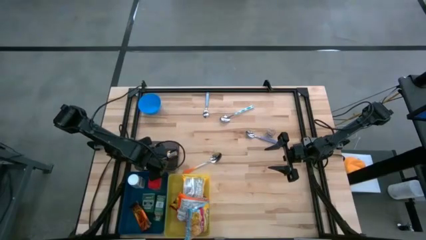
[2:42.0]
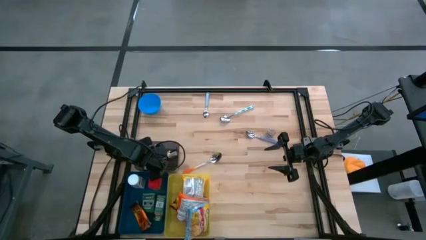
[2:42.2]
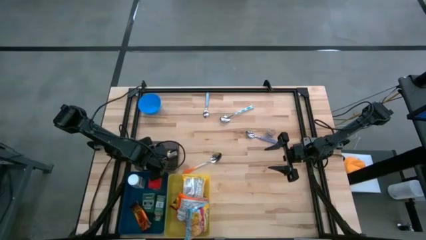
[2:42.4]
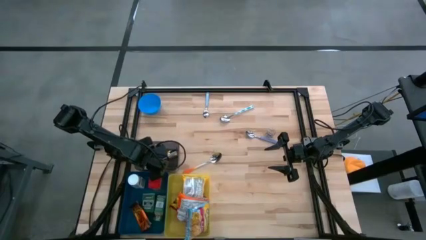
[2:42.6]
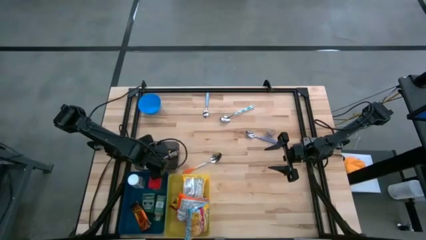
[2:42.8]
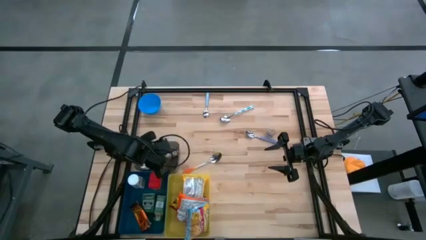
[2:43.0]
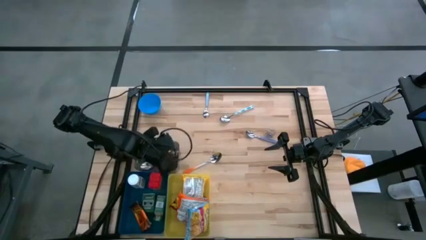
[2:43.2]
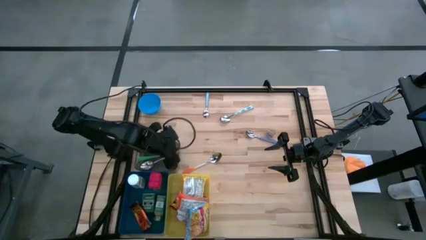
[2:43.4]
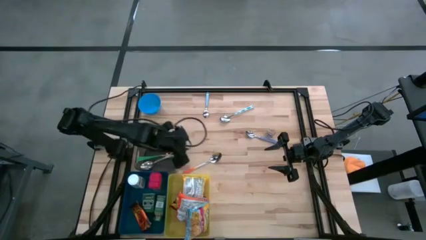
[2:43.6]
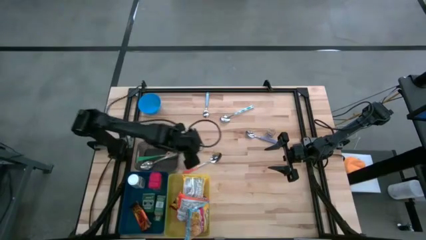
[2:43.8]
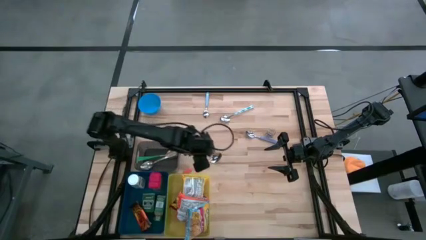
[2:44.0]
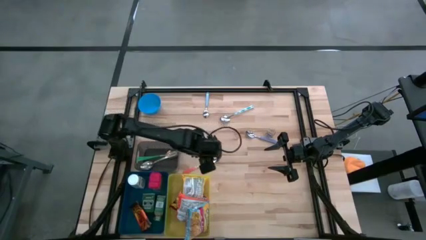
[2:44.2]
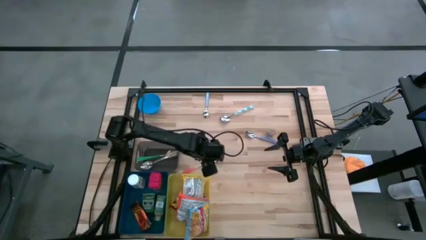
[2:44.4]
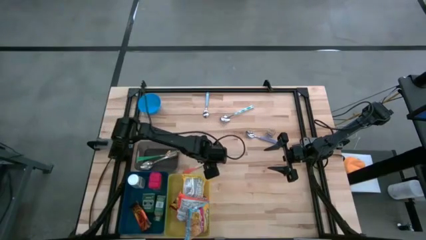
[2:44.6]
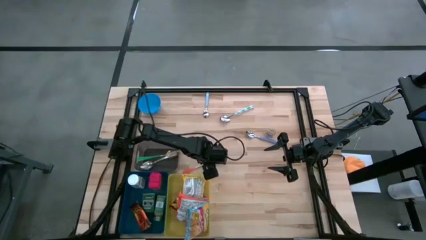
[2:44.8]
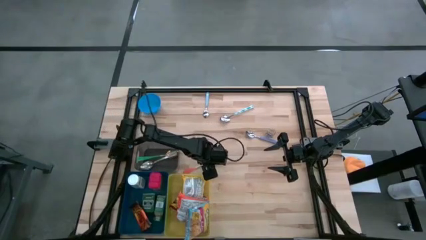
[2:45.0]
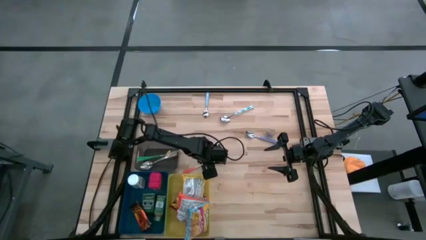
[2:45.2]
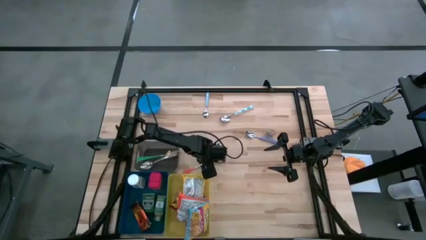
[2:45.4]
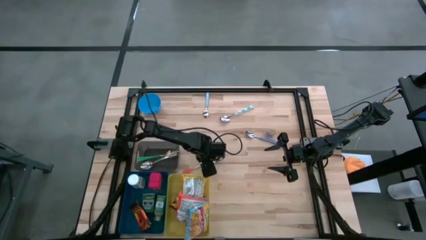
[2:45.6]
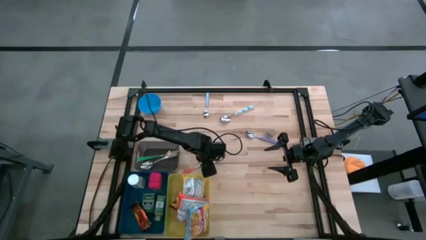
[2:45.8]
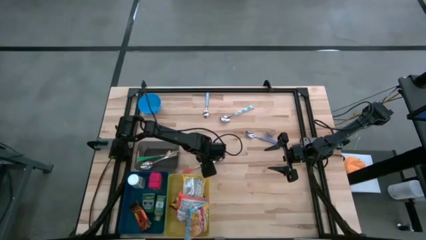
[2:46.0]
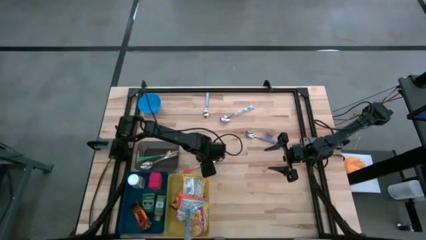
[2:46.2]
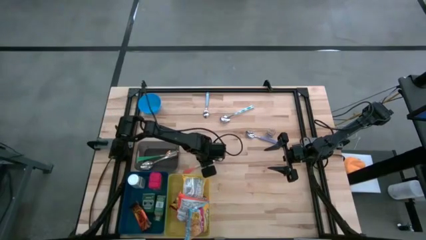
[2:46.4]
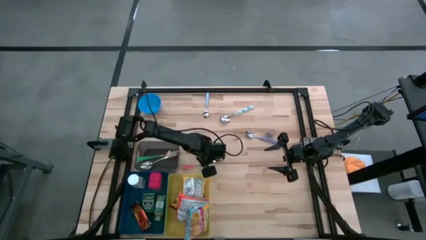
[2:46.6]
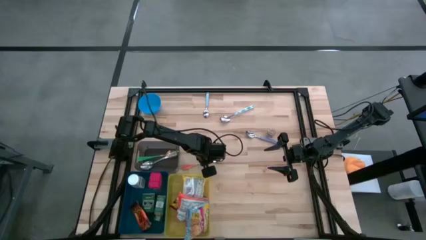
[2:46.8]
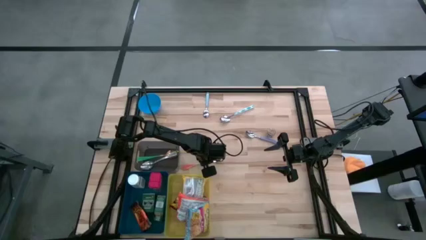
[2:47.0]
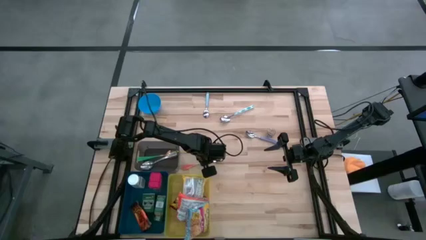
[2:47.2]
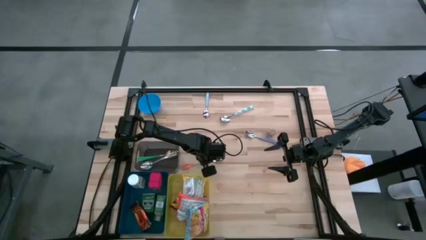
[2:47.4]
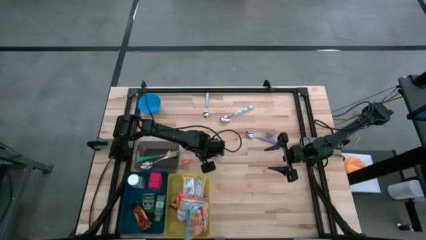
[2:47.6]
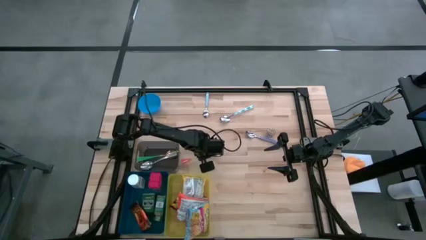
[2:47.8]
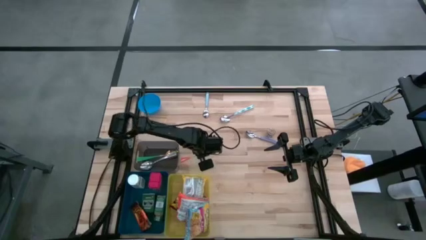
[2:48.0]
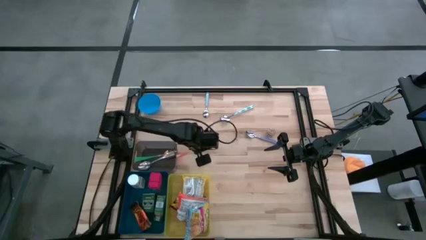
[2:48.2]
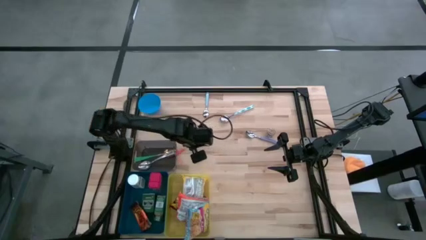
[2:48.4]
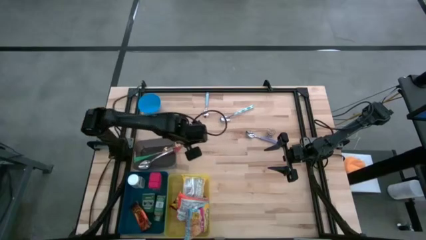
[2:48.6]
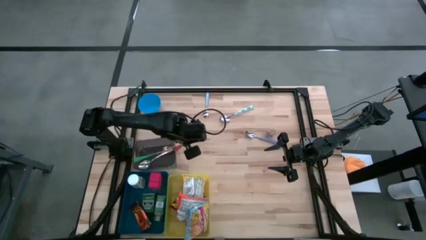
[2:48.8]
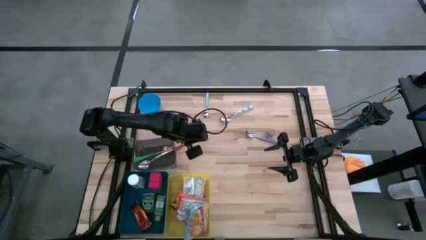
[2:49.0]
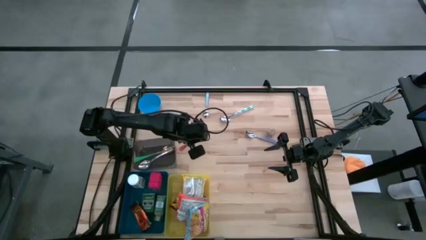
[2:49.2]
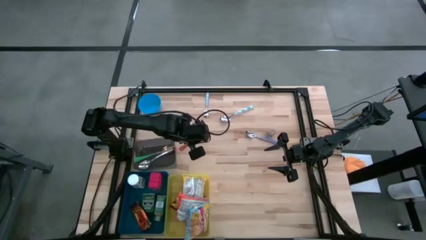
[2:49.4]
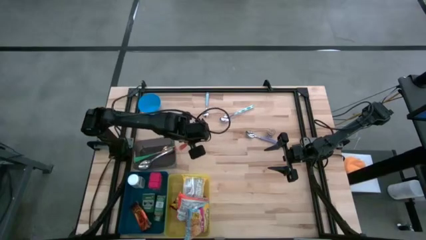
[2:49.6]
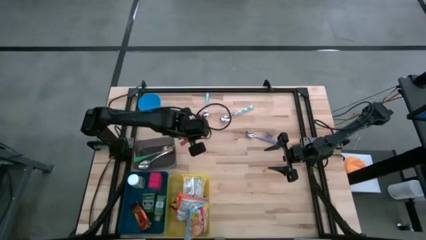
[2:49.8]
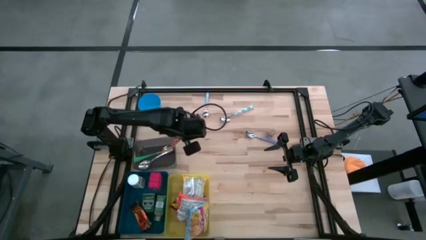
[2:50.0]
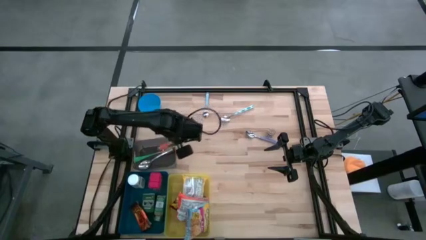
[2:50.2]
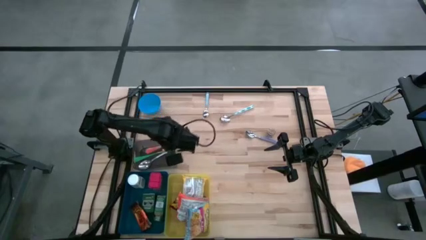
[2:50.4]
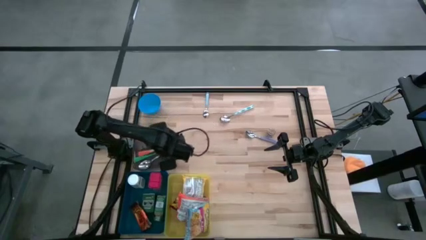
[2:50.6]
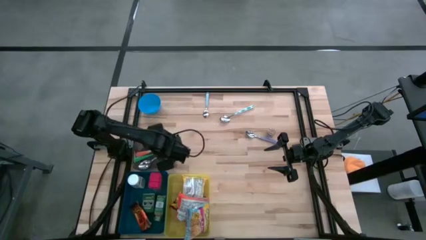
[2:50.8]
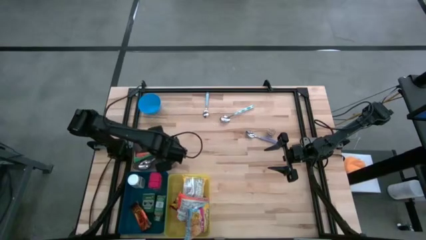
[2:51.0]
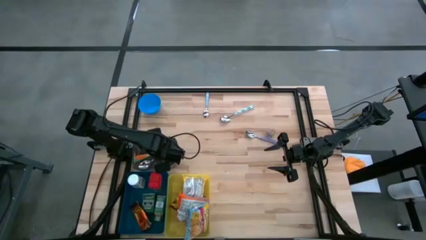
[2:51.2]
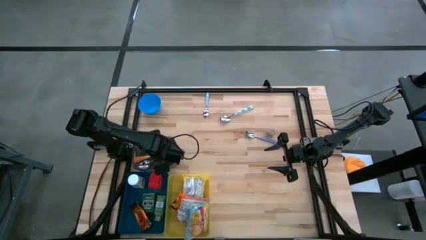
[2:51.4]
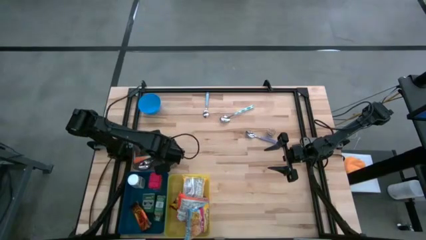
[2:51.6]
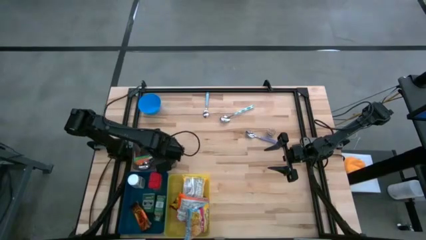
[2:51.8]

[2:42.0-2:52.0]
Put the orange spoon into the gray bin

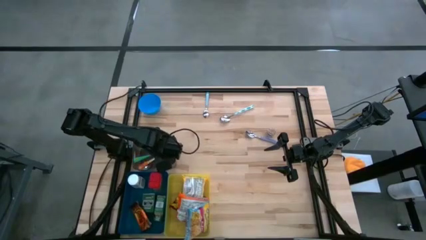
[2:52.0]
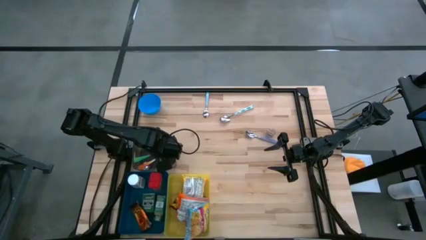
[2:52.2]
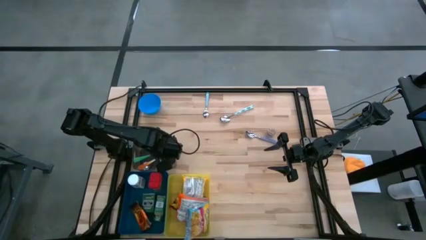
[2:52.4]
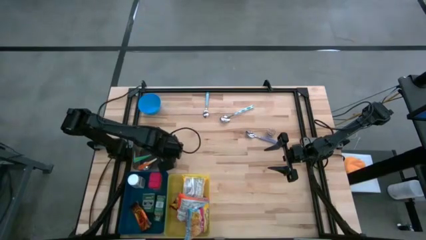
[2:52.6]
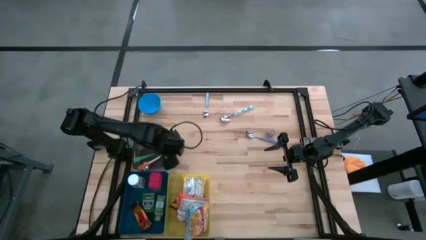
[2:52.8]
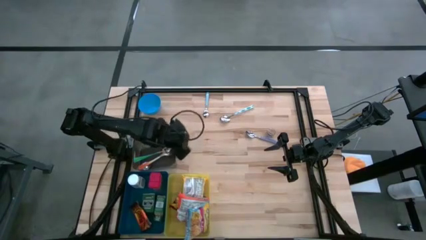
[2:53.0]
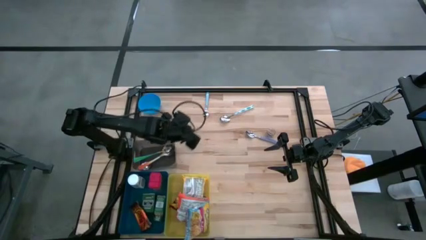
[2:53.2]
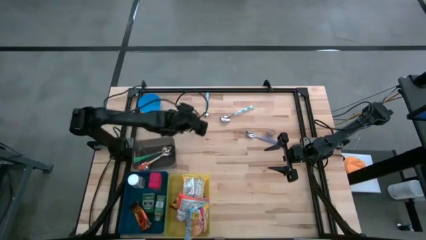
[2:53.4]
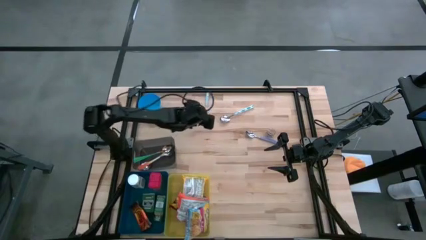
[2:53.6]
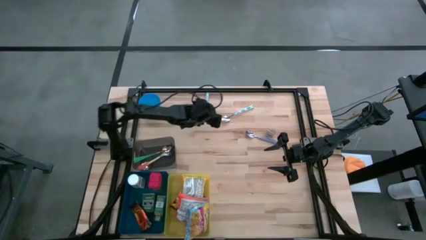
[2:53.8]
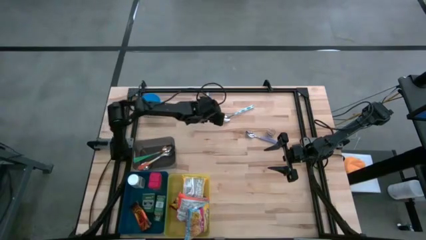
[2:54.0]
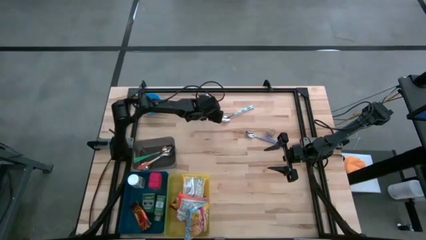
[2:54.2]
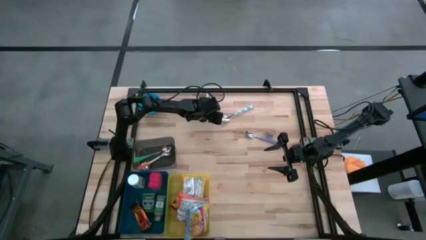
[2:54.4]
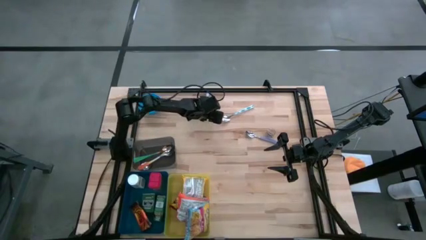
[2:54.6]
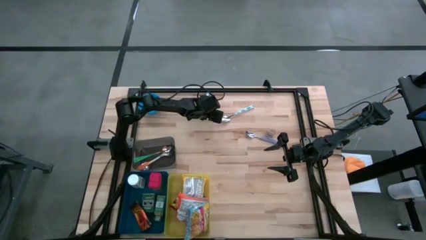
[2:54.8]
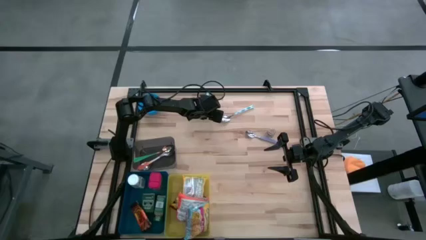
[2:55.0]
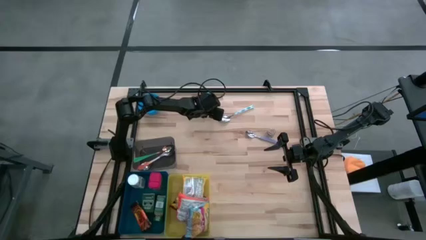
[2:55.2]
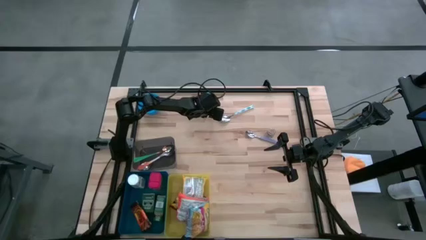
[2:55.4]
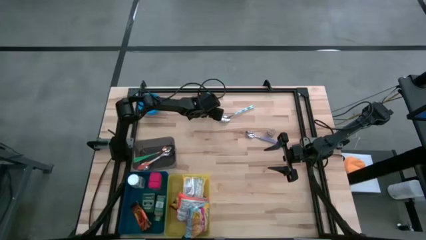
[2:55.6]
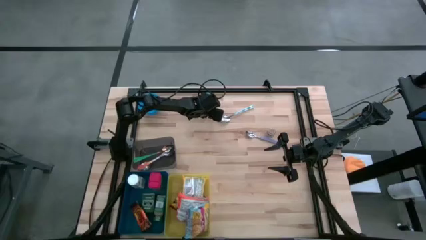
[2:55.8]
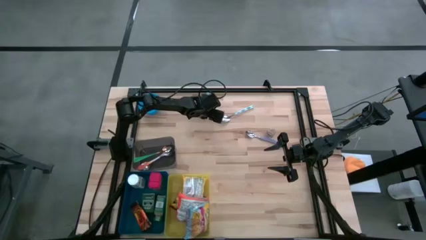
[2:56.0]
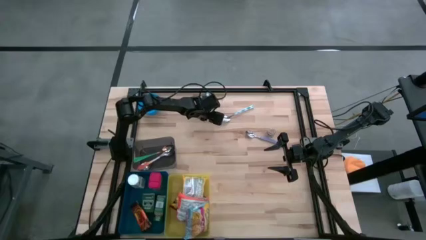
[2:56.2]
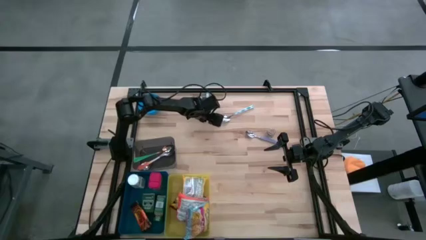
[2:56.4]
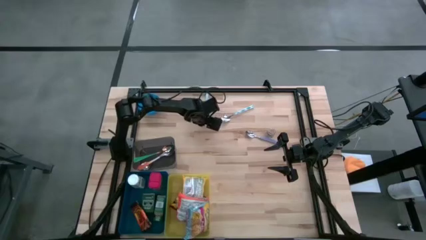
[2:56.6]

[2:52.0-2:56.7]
Put the blue spoon into the gray bin
